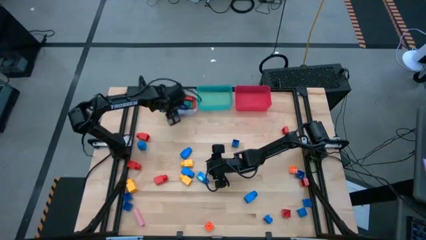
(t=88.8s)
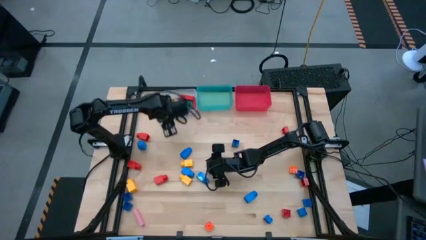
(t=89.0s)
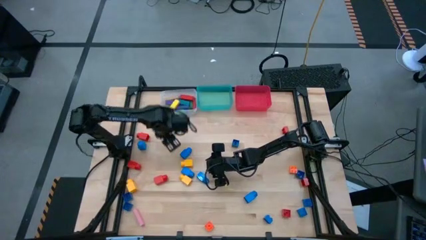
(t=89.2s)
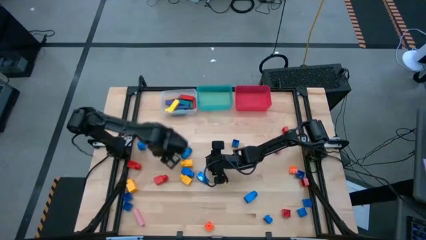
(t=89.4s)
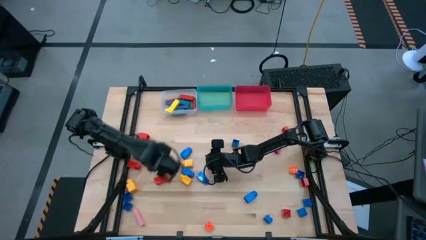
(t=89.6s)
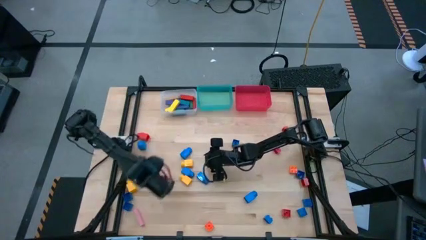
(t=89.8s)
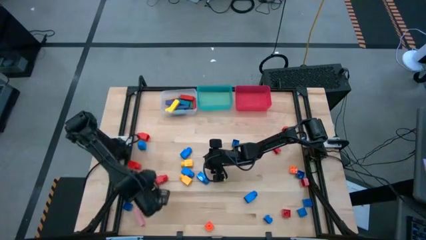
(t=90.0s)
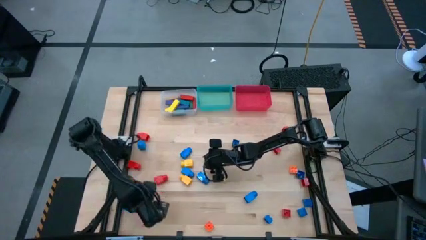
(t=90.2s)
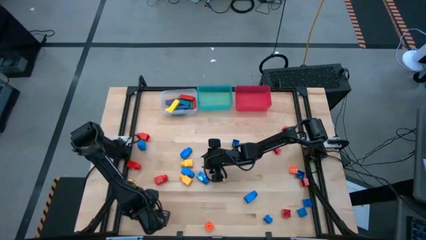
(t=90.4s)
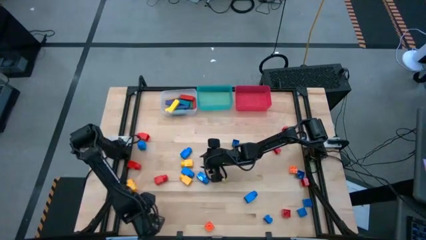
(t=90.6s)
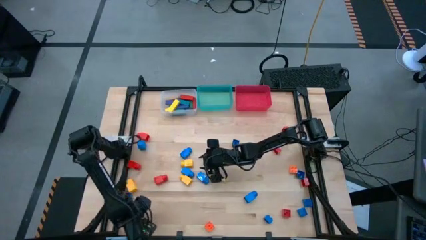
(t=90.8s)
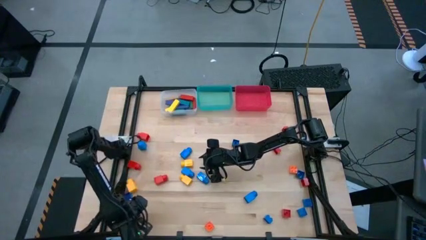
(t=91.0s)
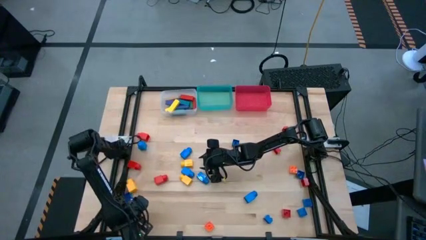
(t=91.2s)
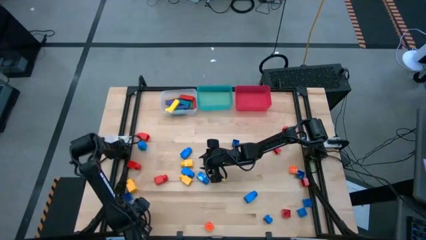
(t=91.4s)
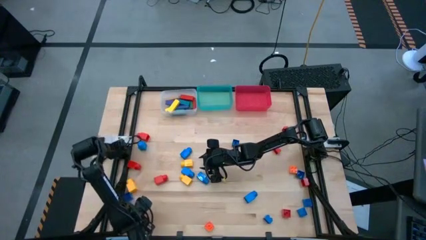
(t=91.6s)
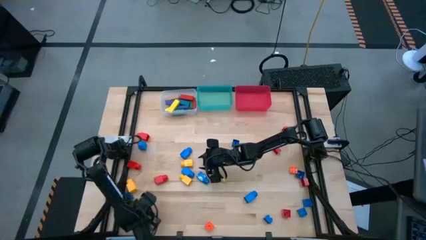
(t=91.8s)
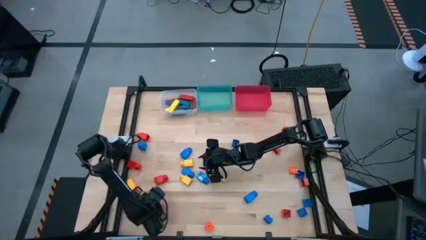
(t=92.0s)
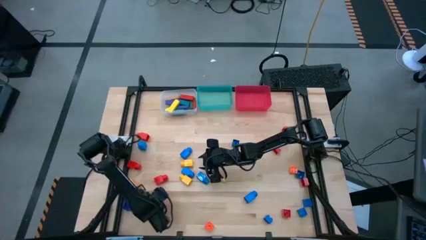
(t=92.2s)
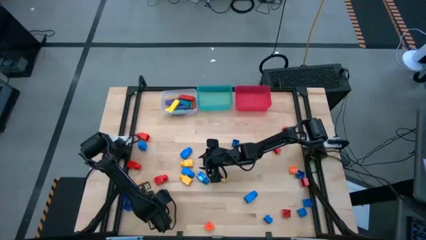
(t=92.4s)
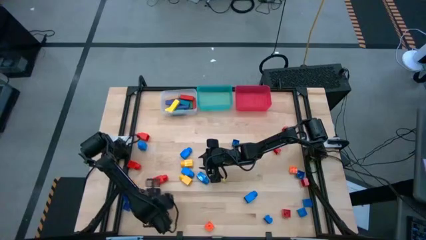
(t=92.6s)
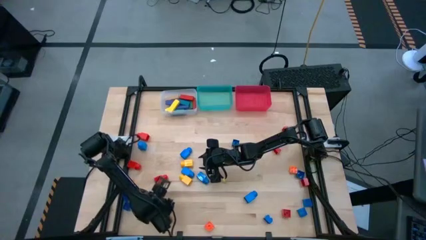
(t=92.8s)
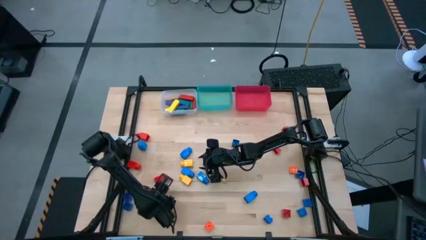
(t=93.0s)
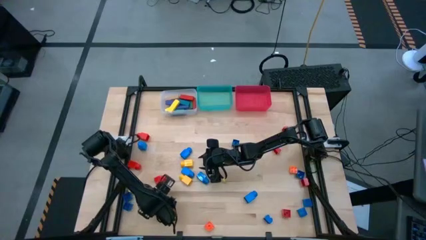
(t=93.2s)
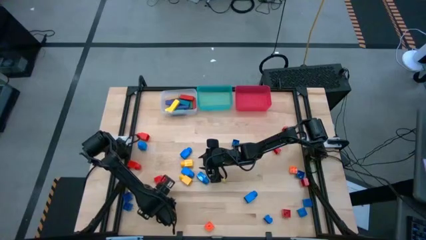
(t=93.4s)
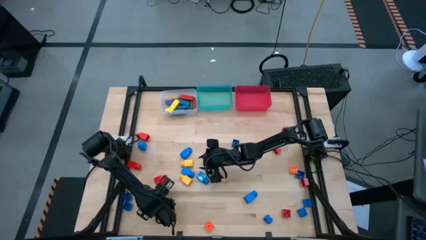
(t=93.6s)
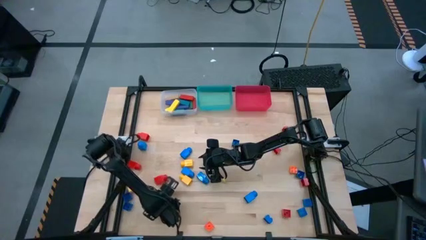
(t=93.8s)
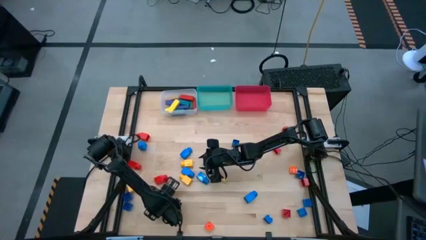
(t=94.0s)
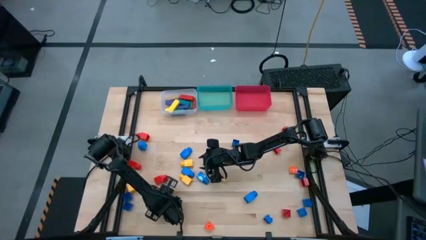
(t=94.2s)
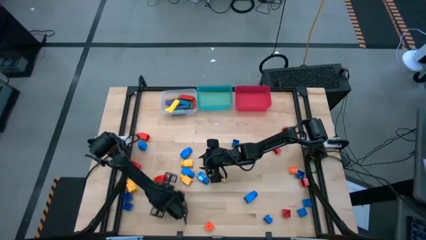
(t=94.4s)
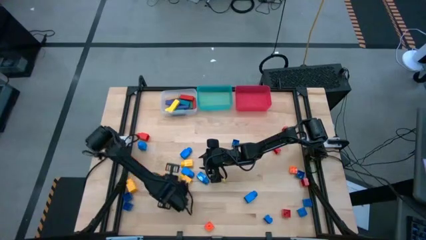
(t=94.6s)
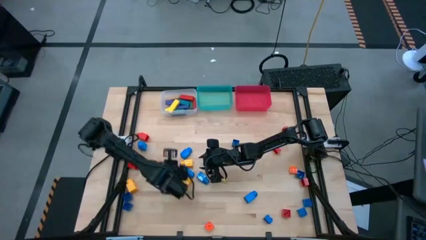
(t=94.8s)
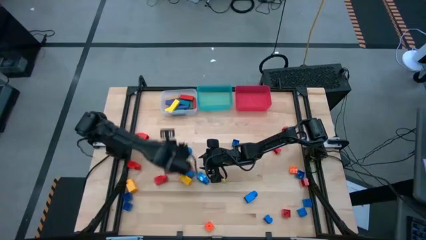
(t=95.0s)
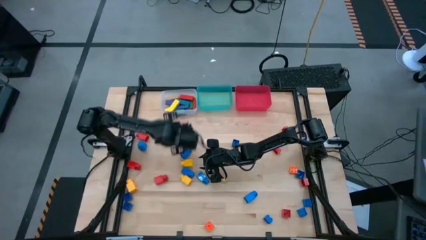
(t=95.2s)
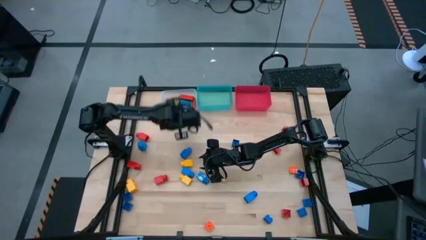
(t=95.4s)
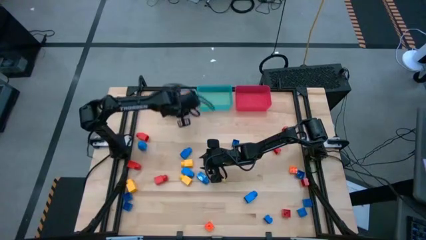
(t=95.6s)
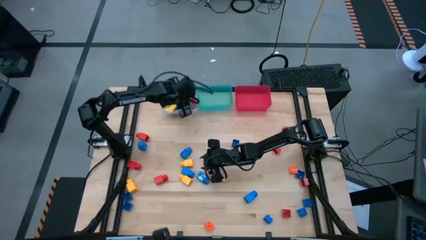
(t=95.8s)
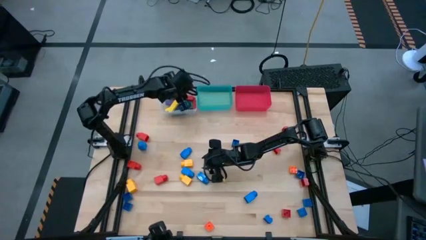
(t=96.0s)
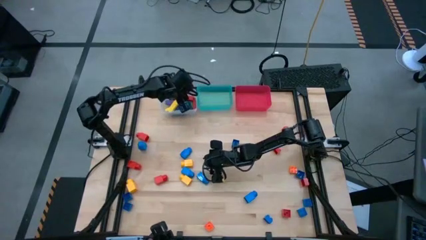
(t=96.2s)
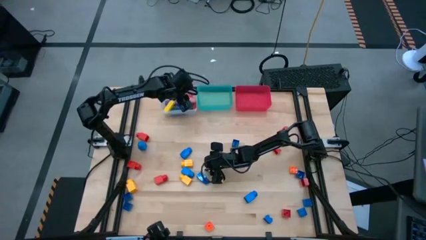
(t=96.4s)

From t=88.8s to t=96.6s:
Task: Sort blocks by size
Put the pink block into the transparent bin

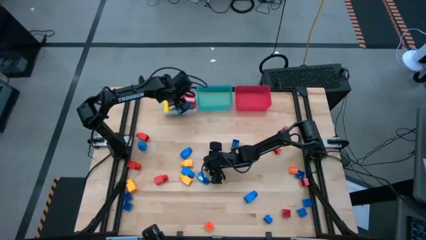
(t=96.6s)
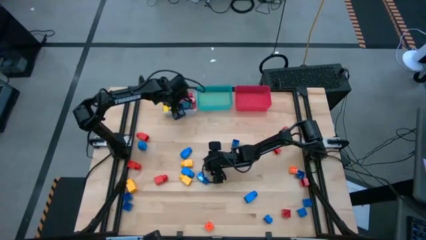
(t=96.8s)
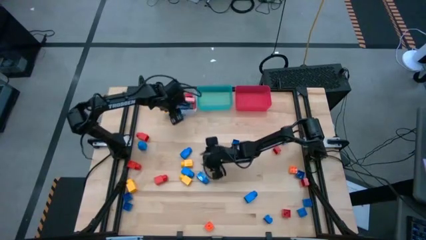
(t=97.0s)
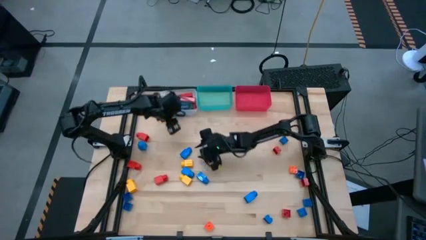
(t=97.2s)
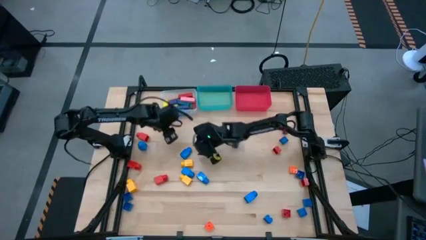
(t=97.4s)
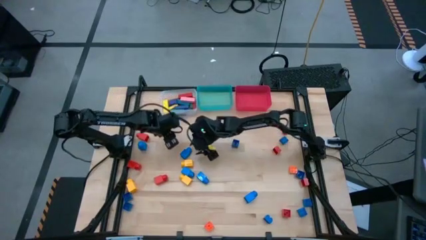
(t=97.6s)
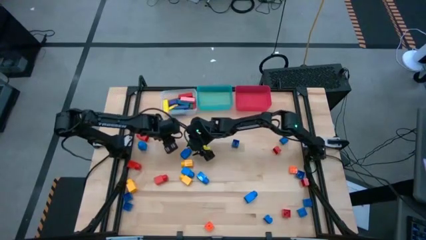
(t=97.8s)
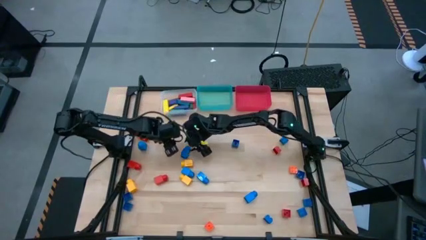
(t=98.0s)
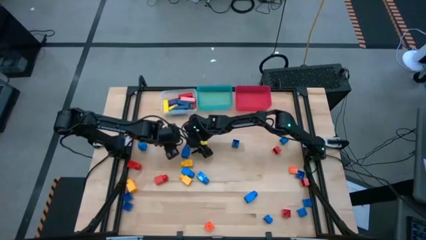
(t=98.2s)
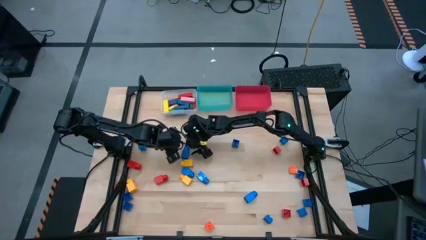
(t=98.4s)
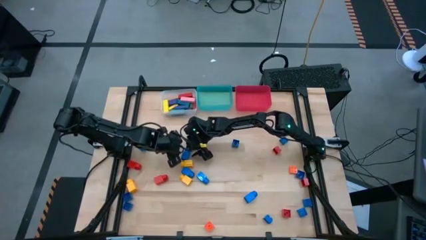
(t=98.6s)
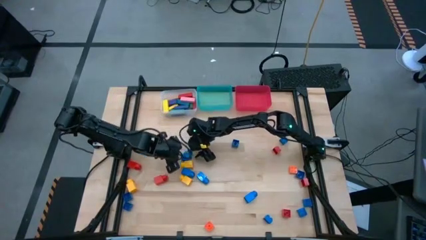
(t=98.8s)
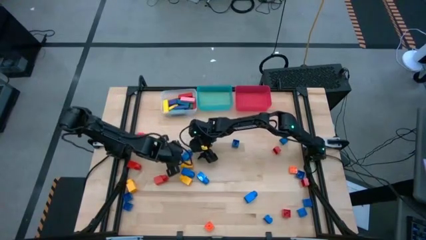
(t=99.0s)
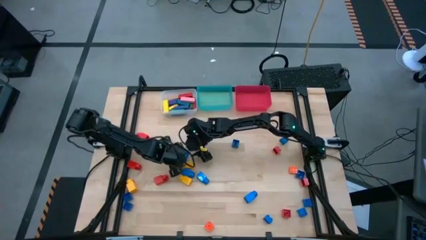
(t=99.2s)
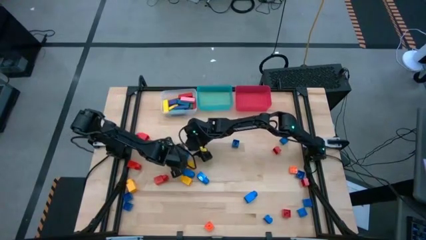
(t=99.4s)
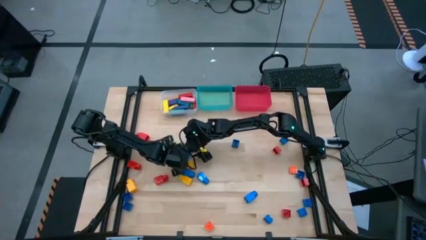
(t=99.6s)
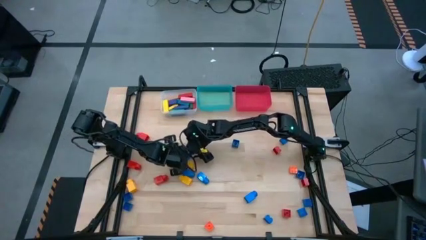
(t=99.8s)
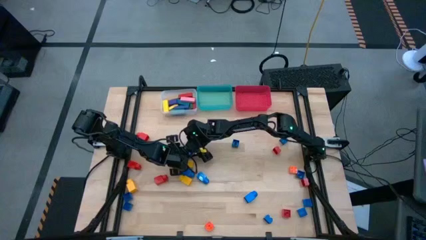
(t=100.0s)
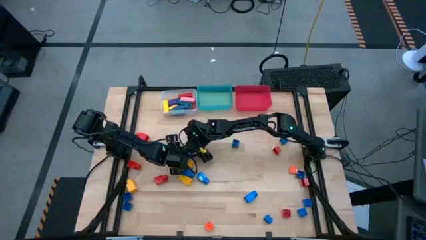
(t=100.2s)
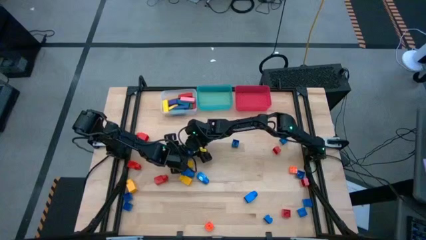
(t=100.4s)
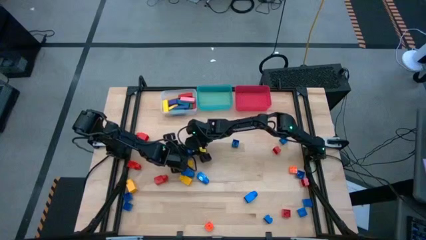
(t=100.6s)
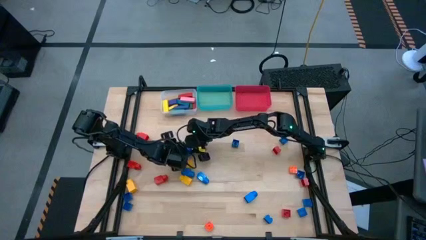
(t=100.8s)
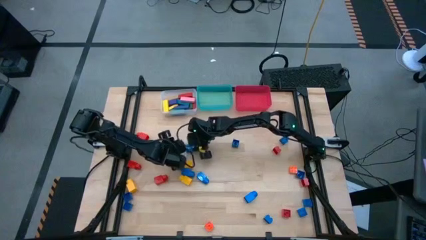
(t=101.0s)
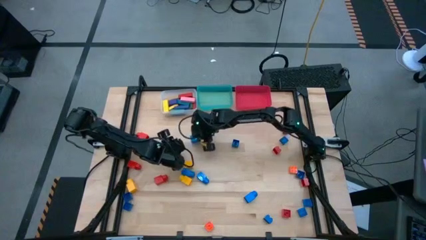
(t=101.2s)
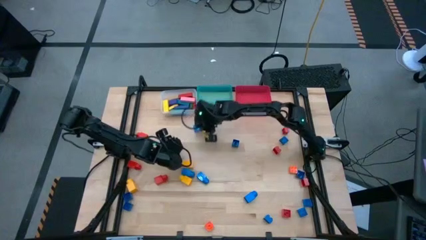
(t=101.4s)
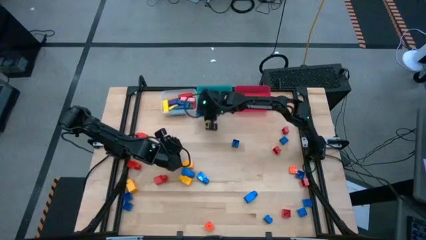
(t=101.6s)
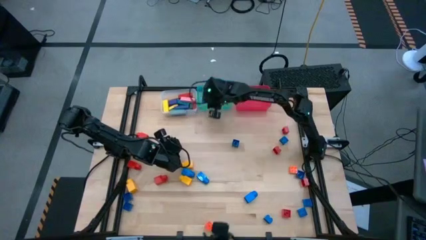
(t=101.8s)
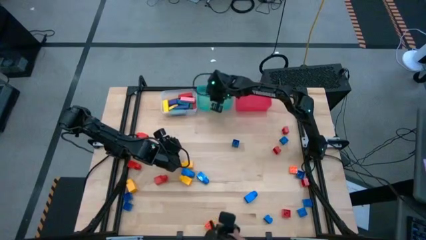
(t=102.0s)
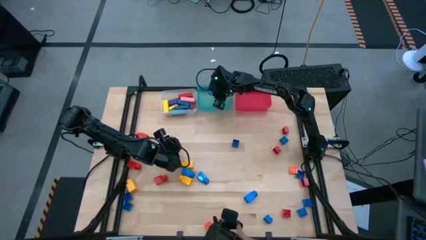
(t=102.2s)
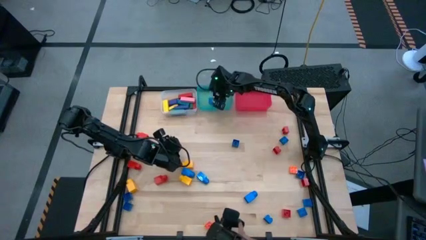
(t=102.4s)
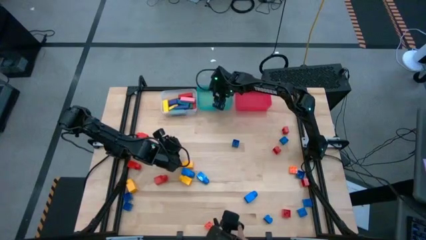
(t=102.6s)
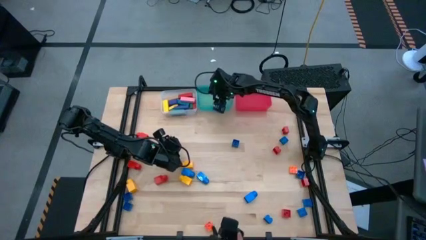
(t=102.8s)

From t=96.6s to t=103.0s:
Put the blue 1 stud game piece into the green bin

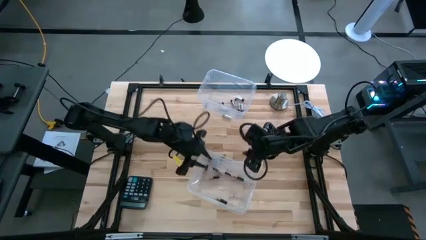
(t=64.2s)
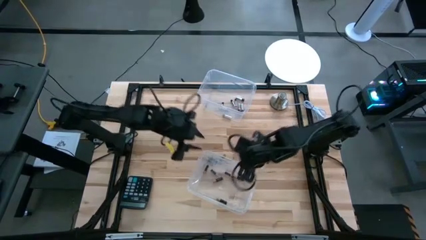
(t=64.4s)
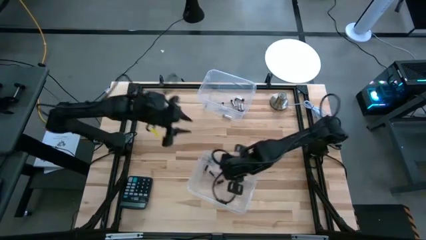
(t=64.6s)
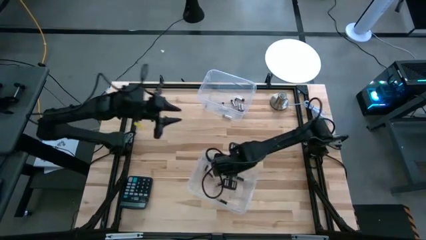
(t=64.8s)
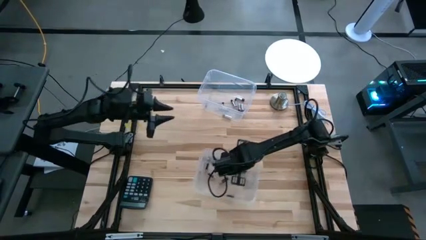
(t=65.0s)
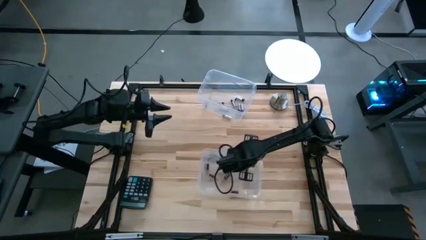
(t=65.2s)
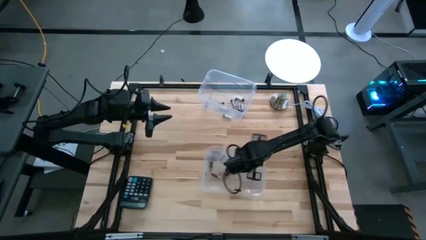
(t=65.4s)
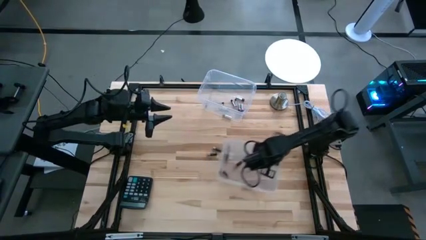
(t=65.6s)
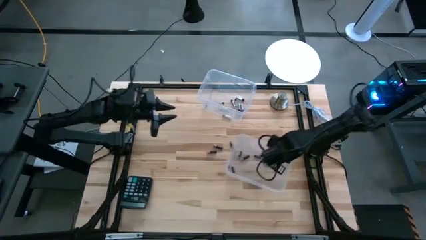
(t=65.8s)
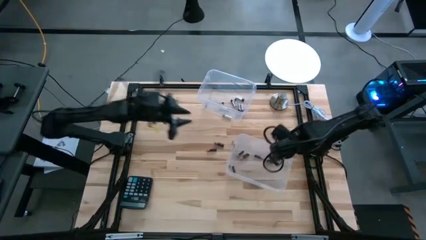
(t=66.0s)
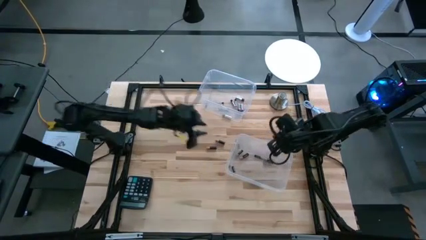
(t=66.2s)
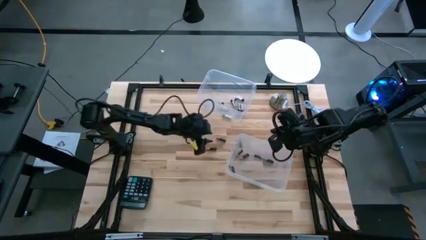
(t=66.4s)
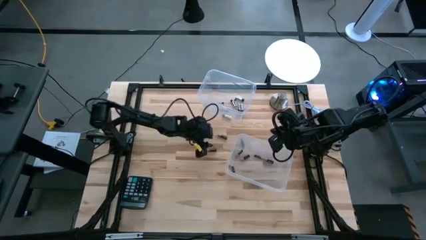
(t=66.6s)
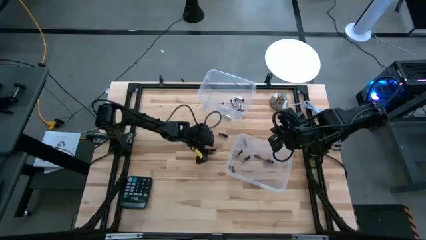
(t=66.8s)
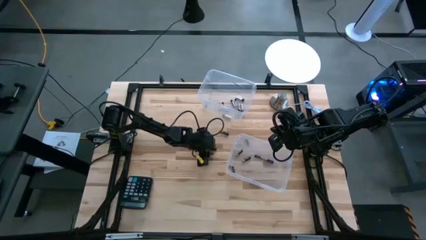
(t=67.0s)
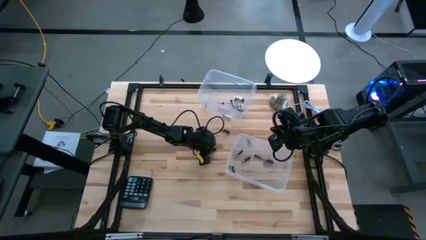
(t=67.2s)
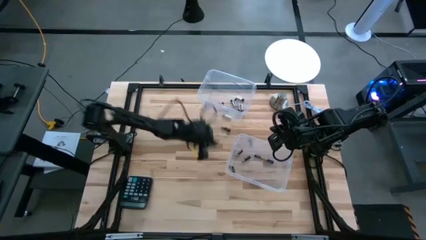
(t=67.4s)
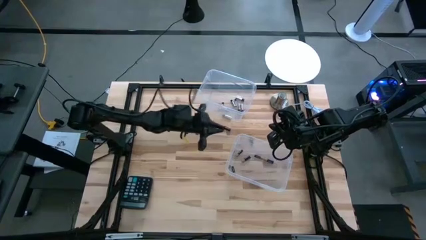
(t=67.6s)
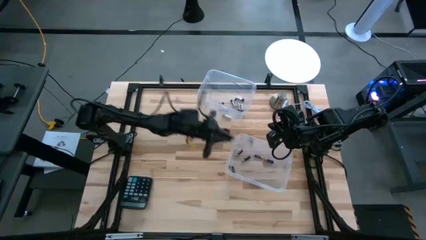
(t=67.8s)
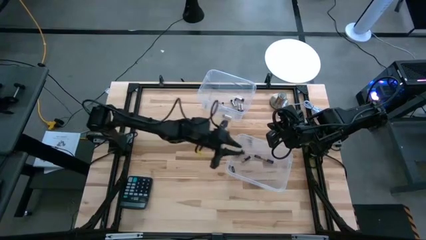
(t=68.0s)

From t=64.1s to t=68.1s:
Task: Sort batteries
Put the black battery into the bottom transparent bin
